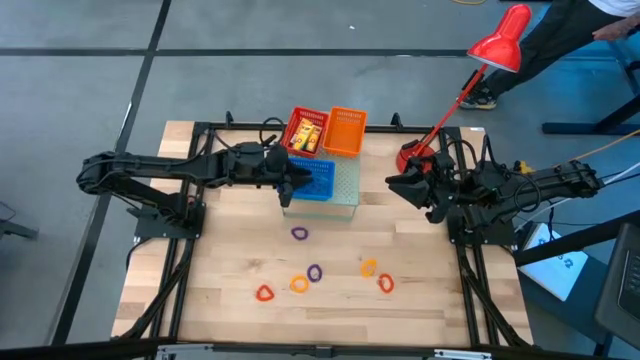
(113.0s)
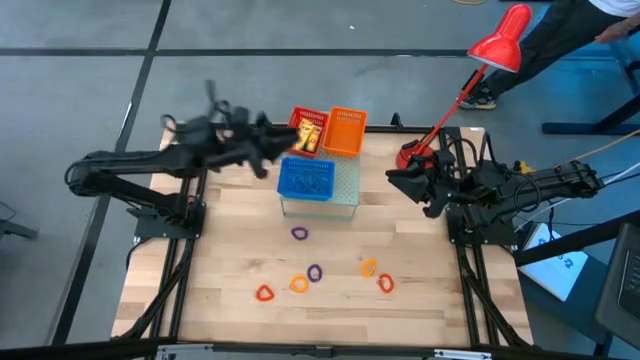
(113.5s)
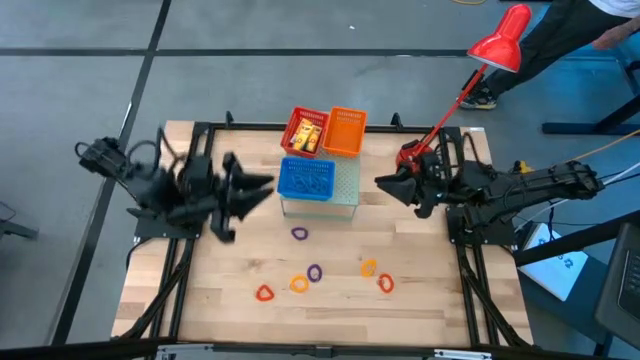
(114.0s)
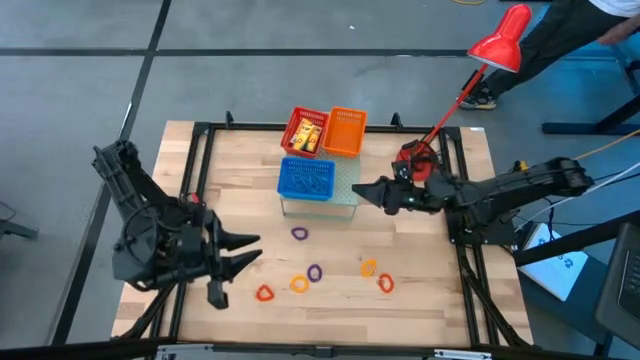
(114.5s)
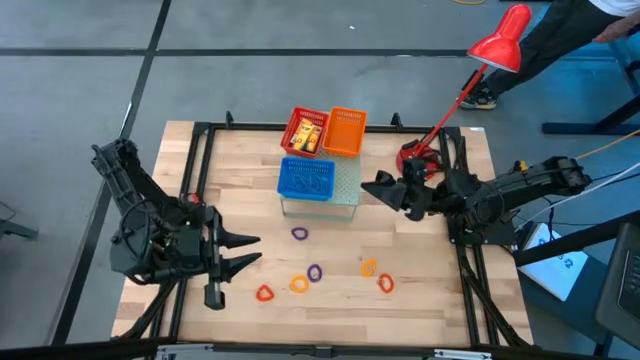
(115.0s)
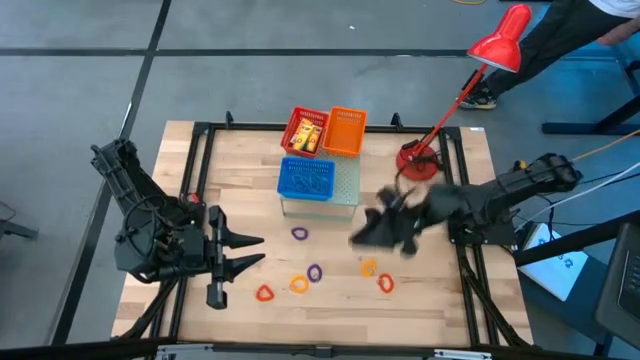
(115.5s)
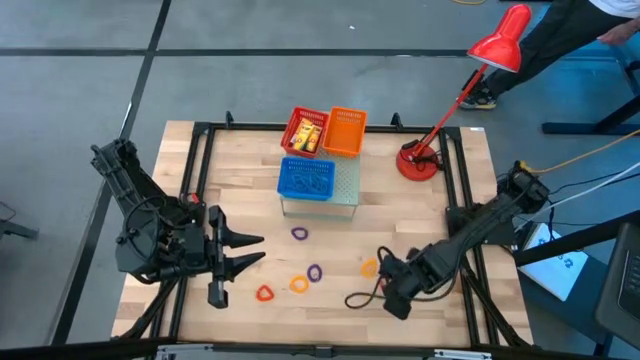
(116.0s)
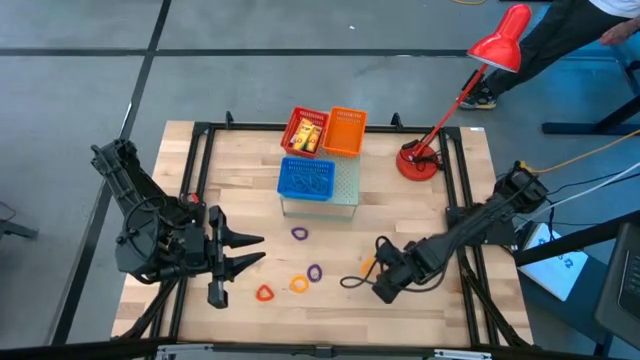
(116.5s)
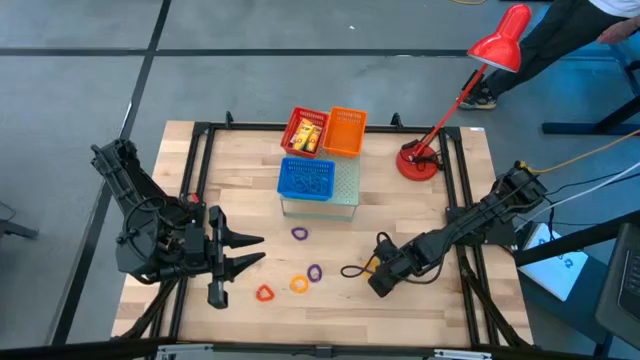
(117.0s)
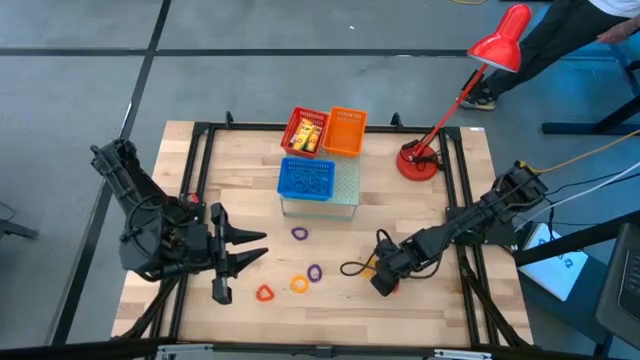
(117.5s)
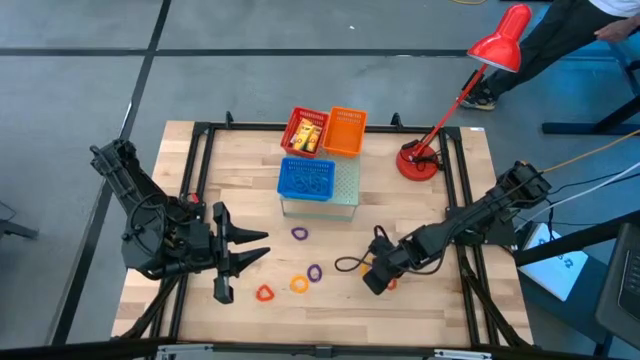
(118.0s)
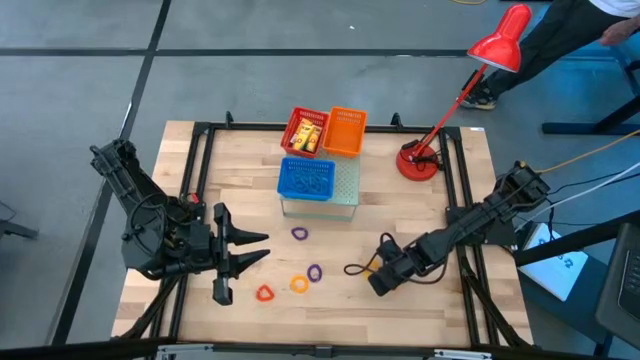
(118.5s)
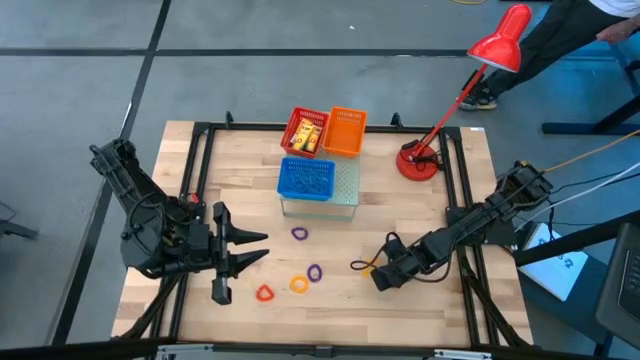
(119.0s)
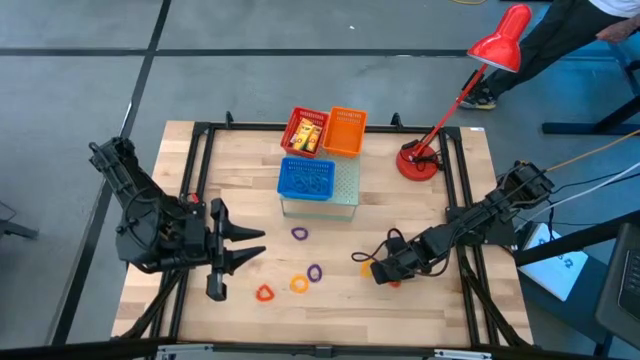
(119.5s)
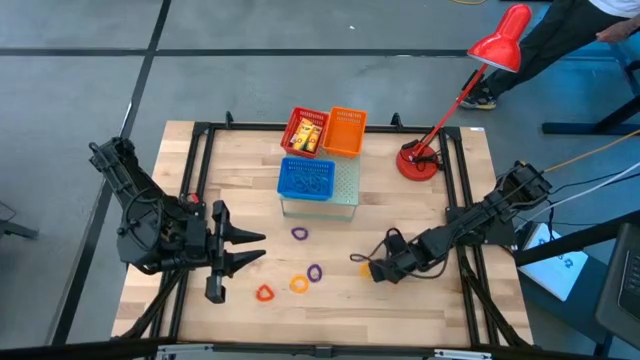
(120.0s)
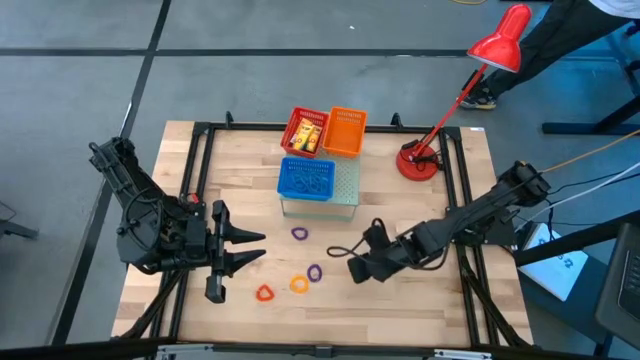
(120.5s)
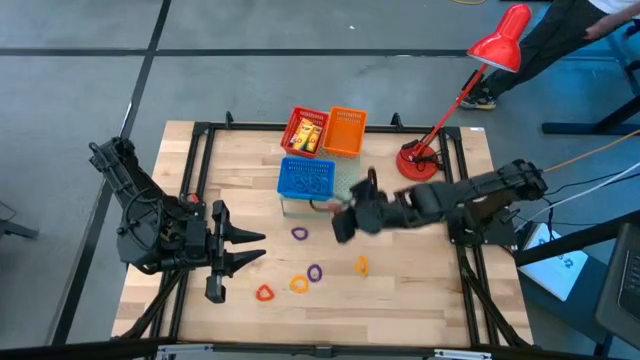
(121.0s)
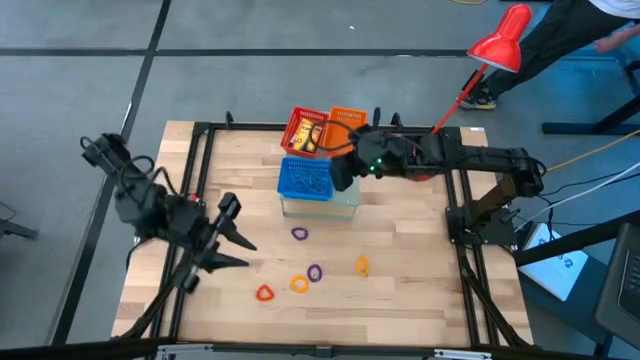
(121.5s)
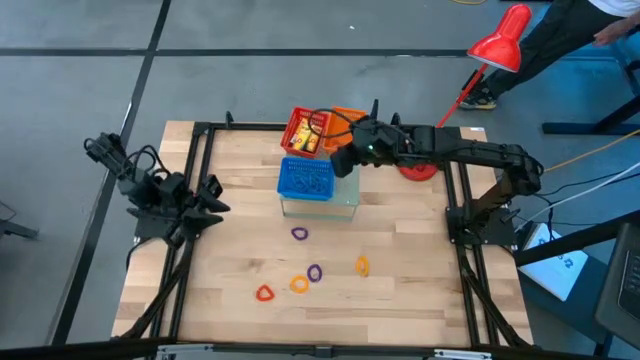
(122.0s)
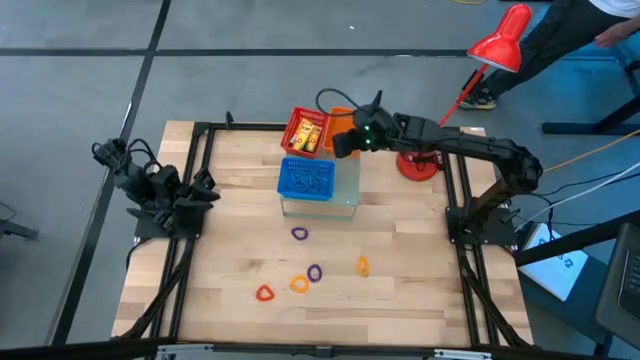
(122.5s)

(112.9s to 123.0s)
Task: Pick & Place Office Desk Supplies
Put the orange spring keychain into the orange basket on the shelf

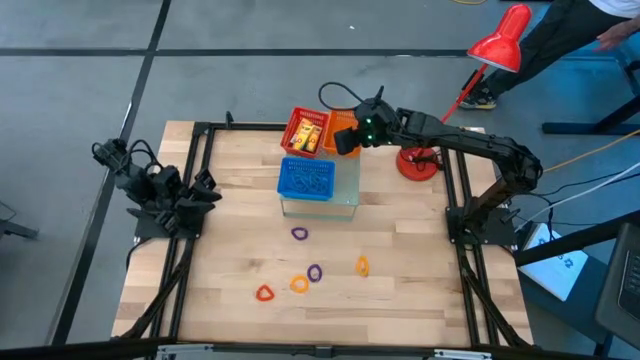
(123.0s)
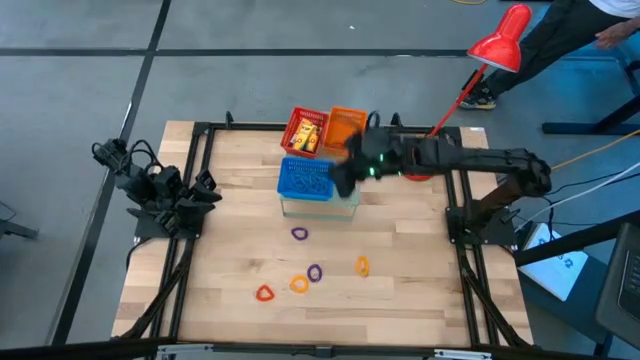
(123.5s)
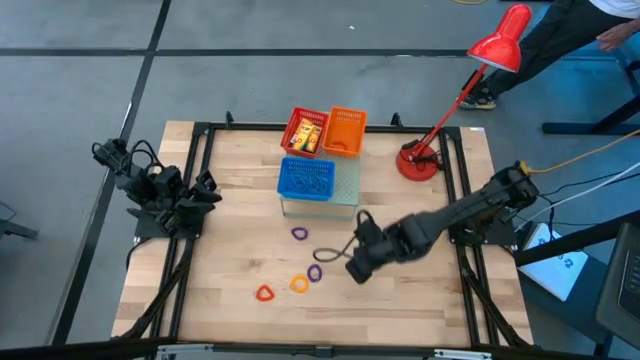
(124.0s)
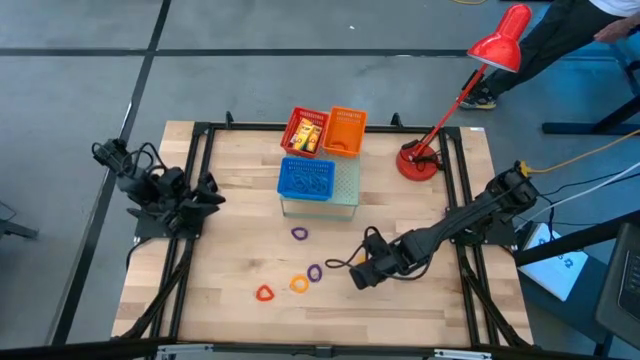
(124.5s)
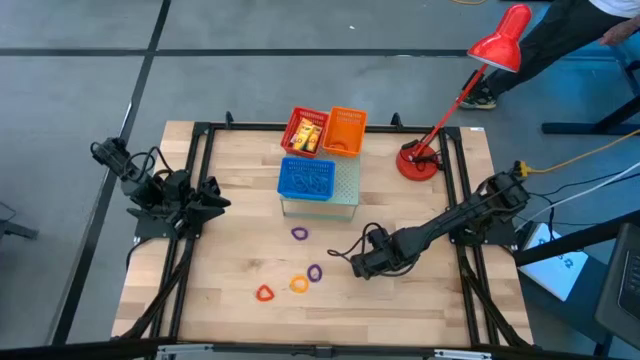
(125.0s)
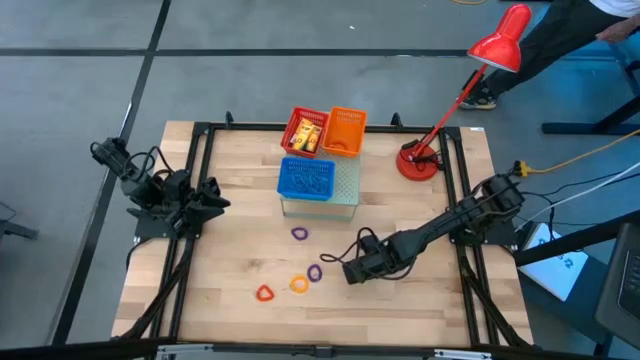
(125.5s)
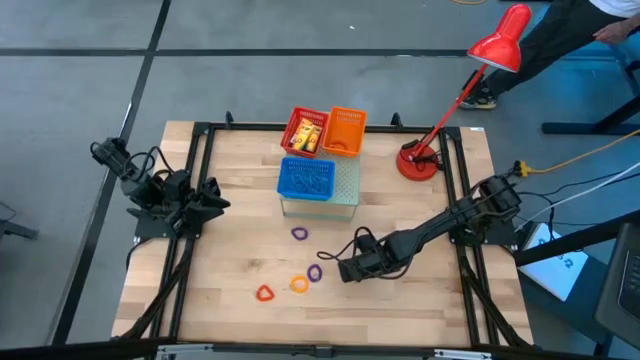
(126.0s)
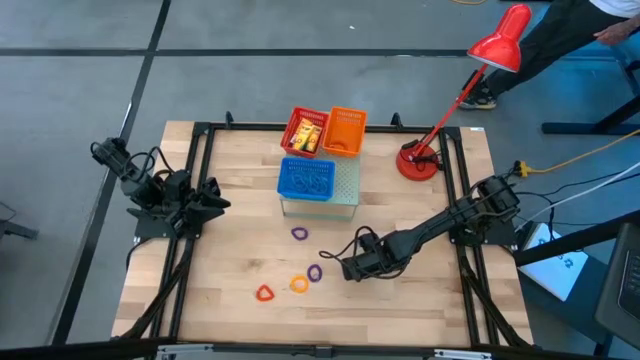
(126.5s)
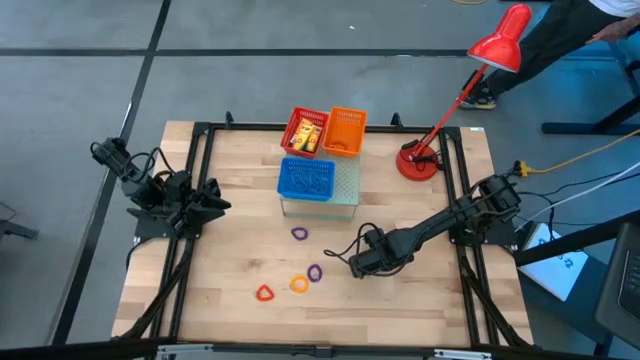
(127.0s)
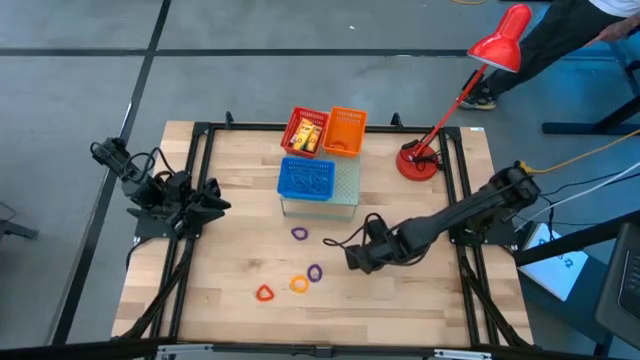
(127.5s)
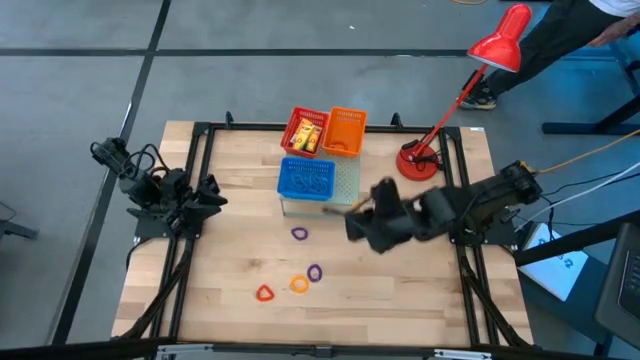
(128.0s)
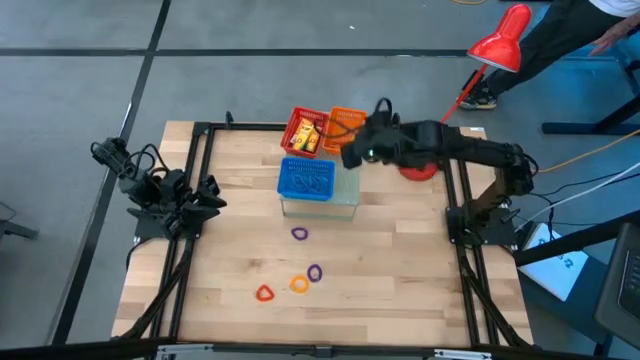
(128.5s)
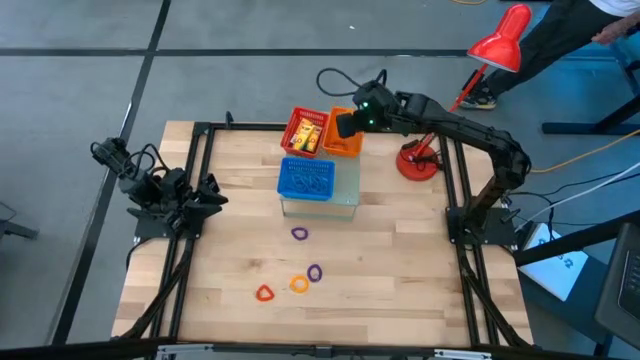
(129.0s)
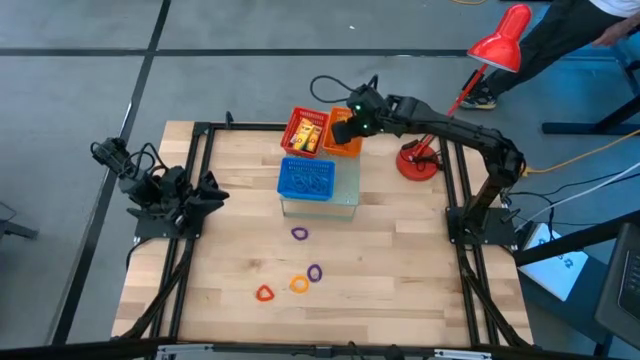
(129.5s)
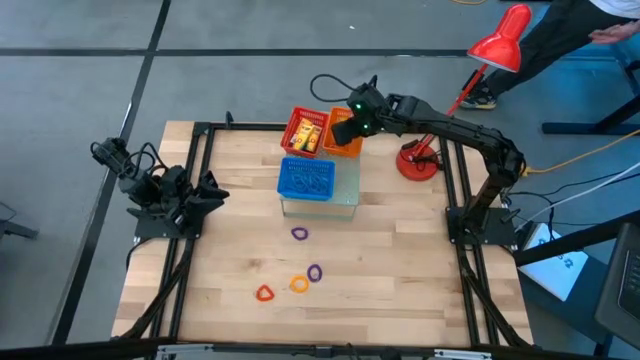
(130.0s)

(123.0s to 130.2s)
Put the yellow spring keychain into the orange basket on the shelf

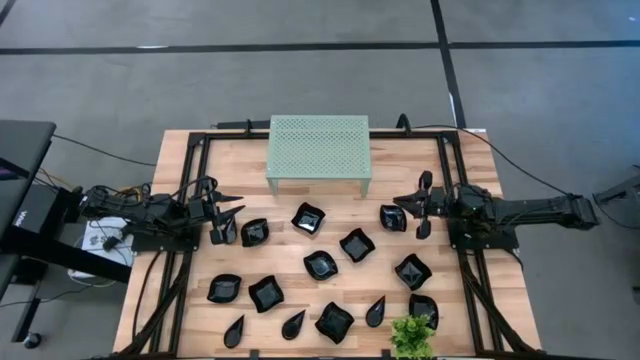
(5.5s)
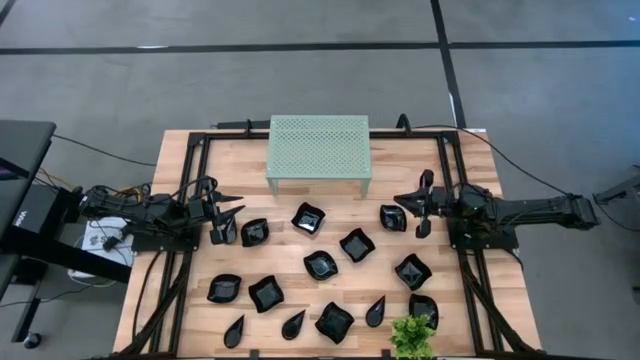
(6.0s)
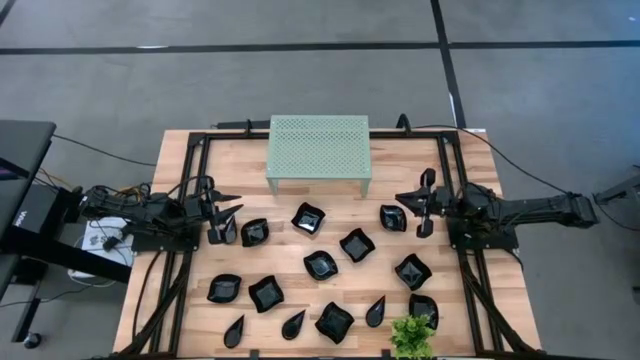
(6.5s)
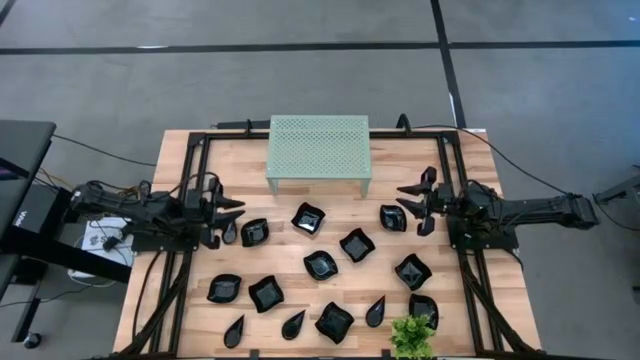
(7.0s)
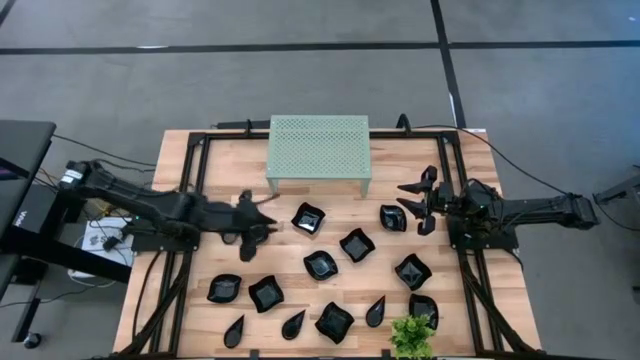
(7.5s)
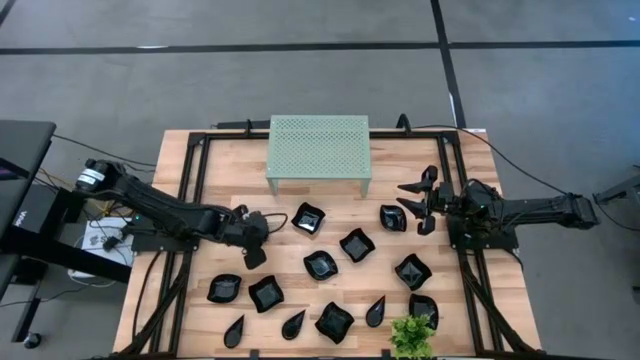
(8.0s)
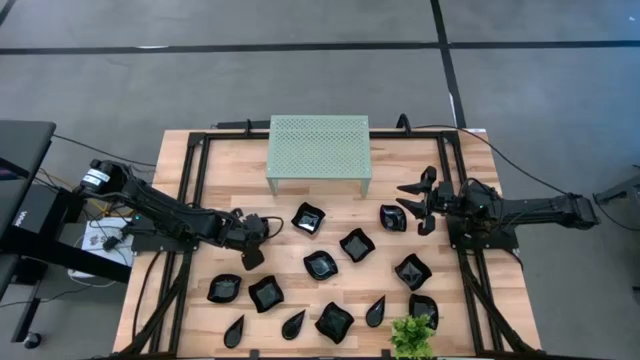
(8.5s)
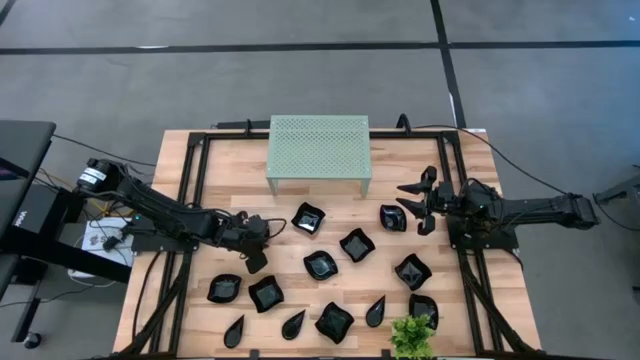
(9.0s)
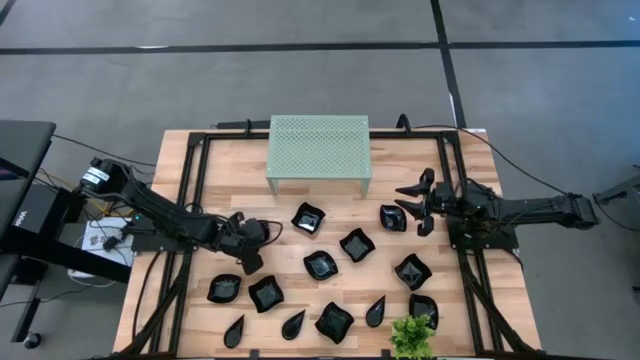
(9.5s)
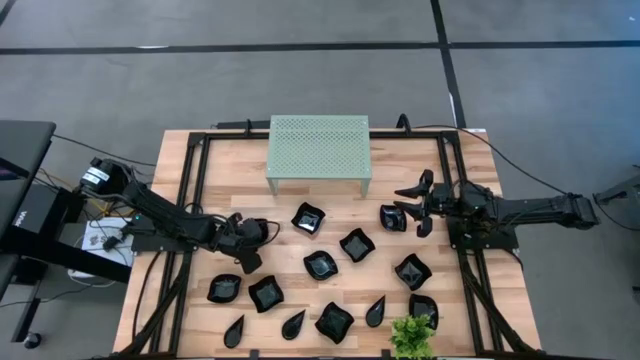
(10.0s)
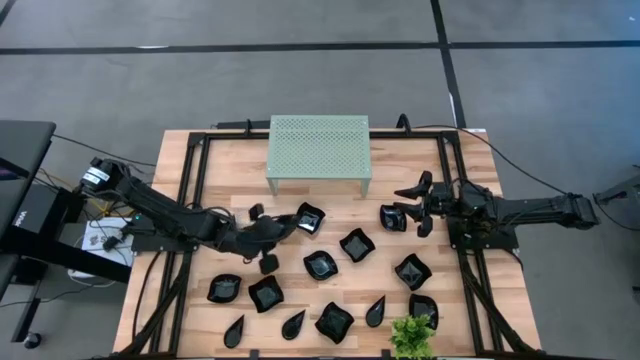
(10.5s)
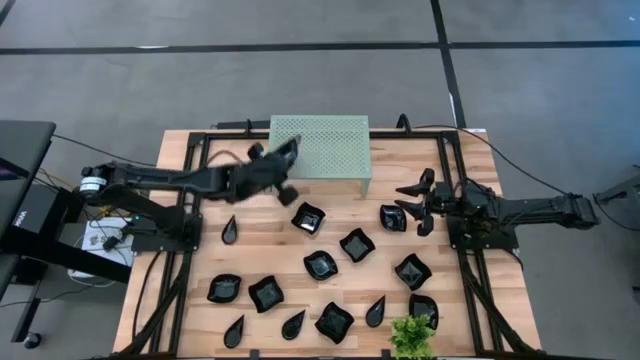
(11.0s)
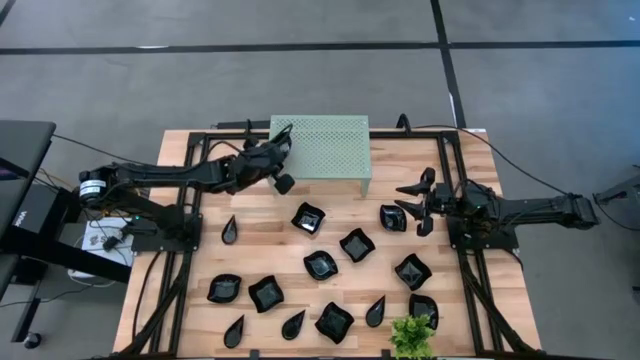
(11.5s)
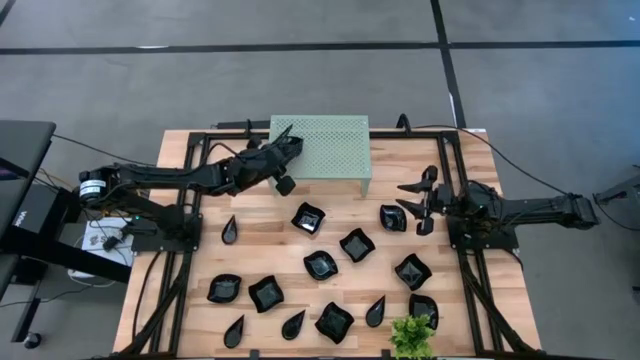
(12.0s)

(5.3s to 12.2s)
Task: Pick & Place Mini shaped plates
Put the leaf-shaped plate on the shelf
